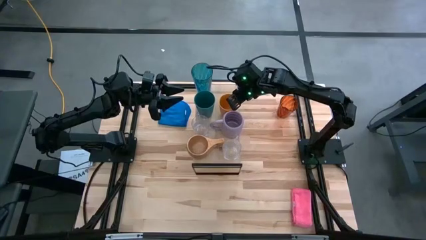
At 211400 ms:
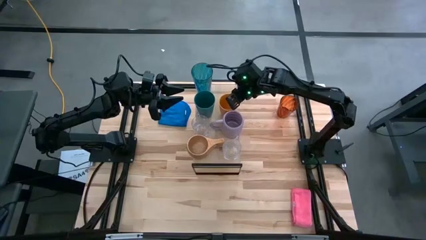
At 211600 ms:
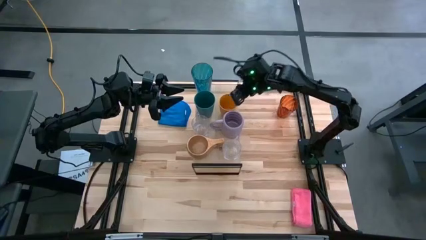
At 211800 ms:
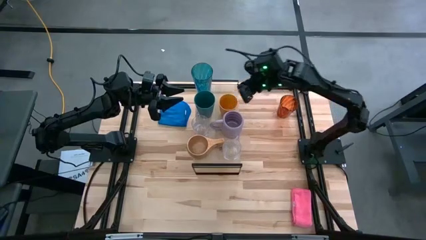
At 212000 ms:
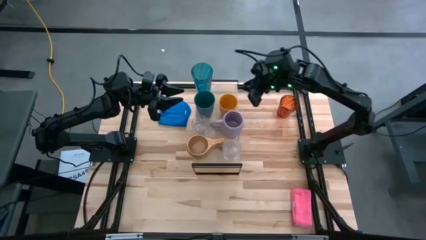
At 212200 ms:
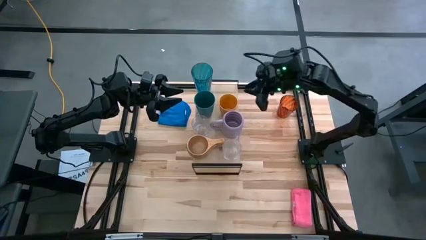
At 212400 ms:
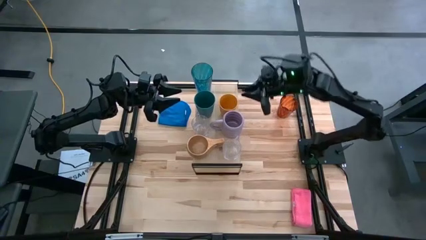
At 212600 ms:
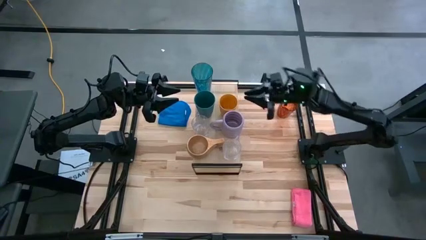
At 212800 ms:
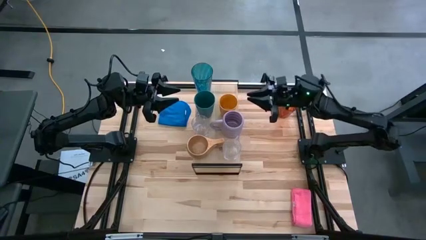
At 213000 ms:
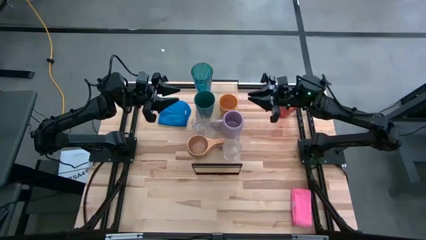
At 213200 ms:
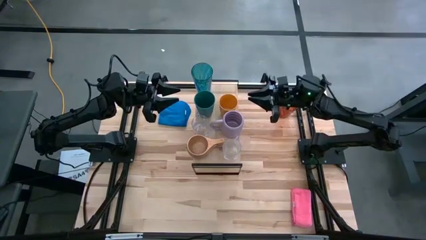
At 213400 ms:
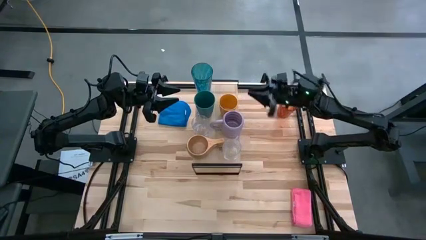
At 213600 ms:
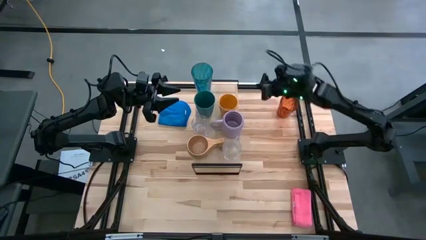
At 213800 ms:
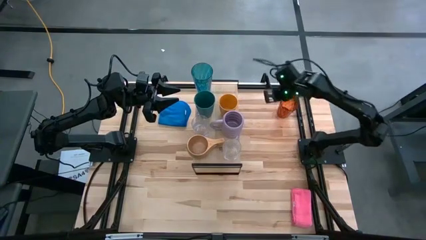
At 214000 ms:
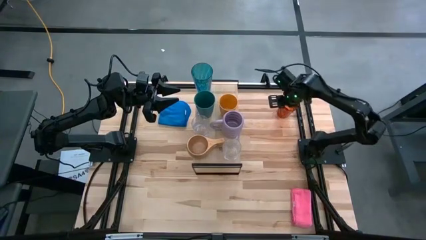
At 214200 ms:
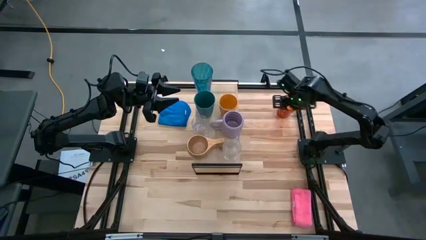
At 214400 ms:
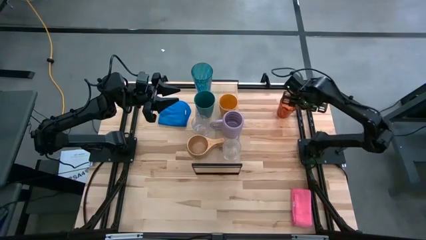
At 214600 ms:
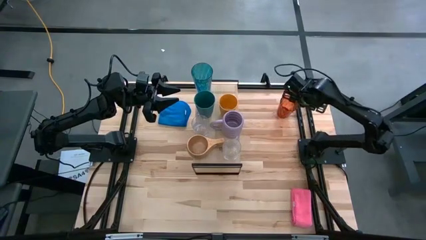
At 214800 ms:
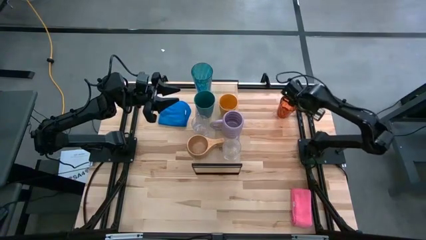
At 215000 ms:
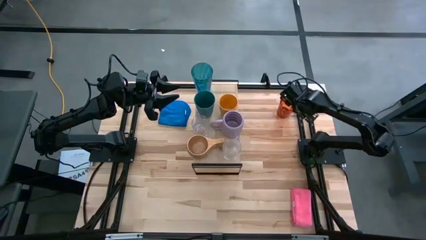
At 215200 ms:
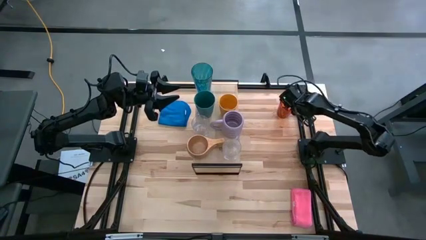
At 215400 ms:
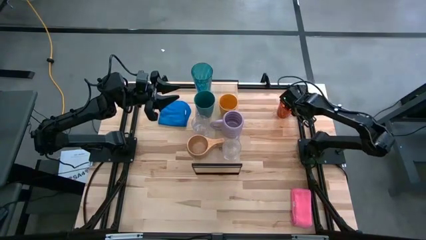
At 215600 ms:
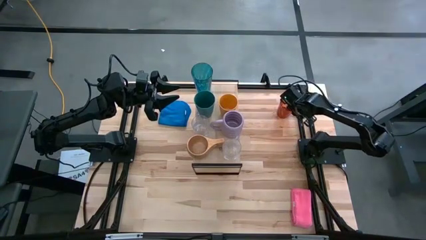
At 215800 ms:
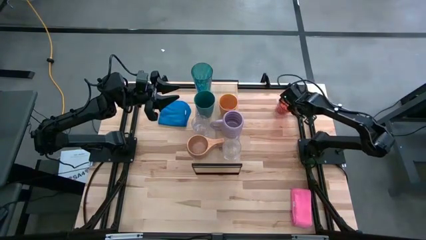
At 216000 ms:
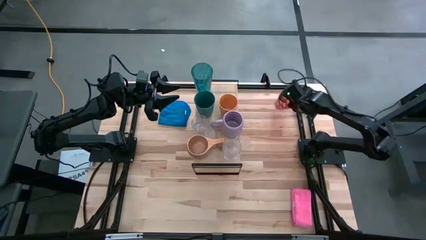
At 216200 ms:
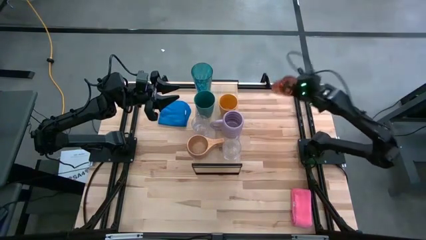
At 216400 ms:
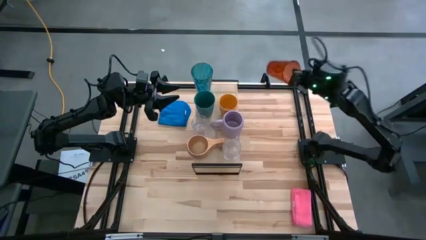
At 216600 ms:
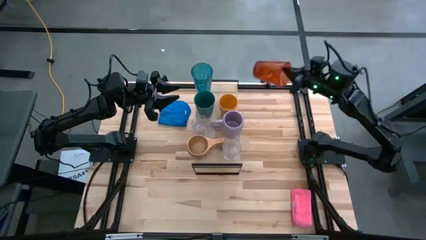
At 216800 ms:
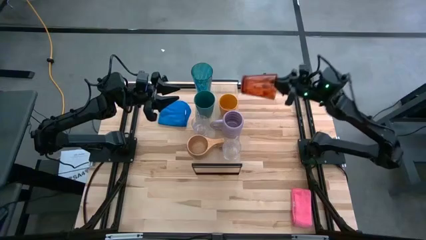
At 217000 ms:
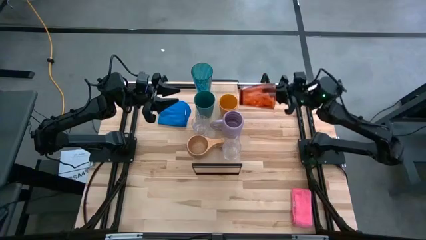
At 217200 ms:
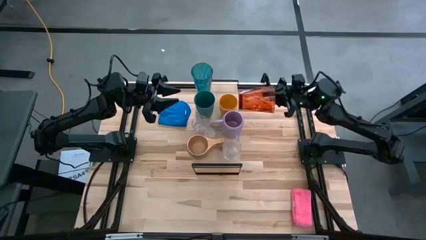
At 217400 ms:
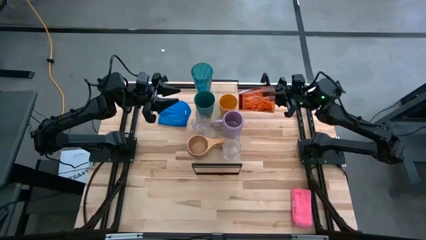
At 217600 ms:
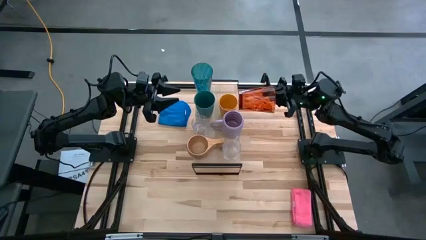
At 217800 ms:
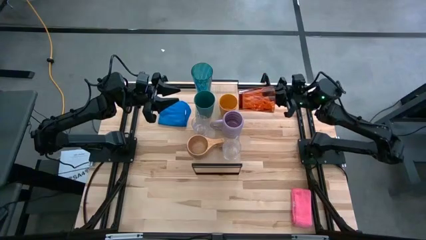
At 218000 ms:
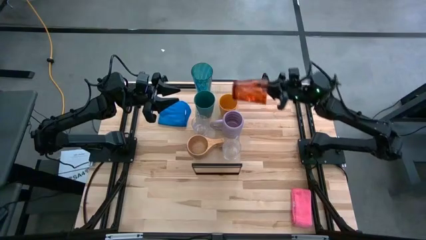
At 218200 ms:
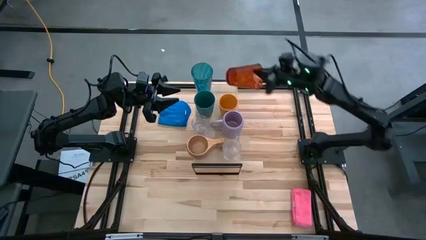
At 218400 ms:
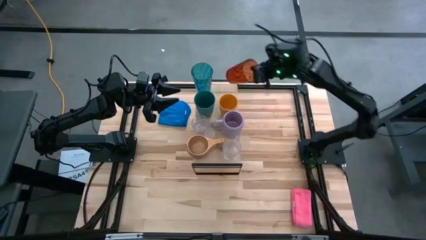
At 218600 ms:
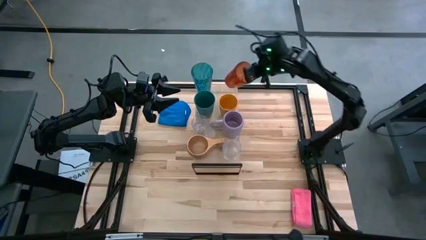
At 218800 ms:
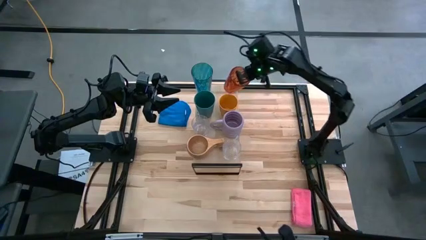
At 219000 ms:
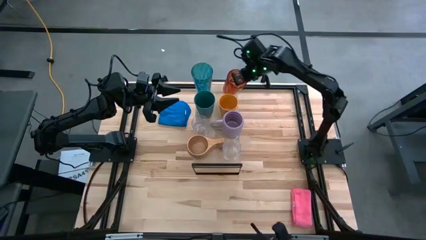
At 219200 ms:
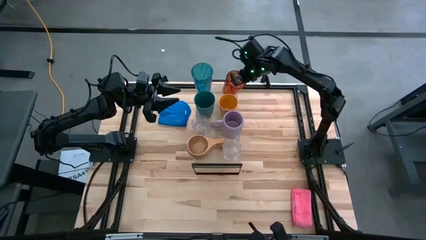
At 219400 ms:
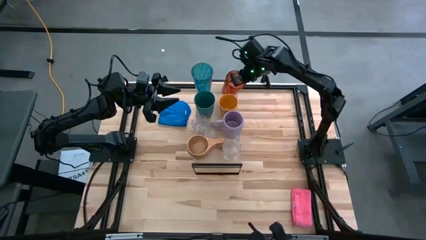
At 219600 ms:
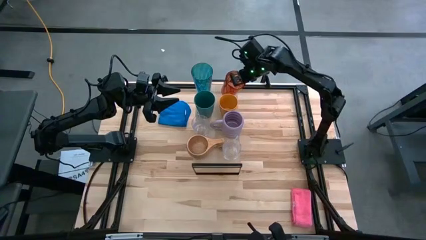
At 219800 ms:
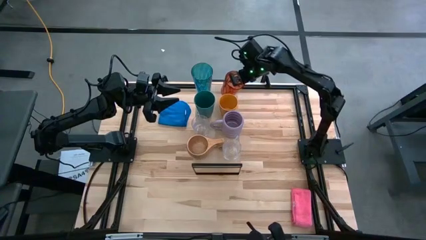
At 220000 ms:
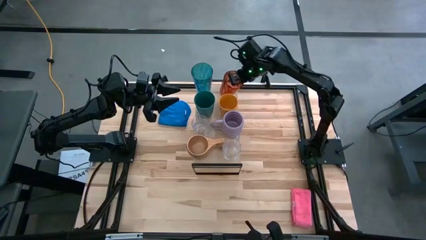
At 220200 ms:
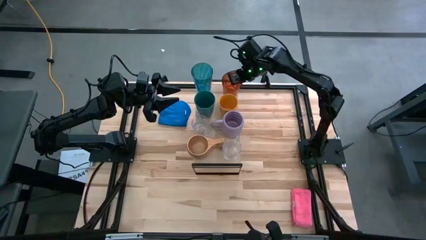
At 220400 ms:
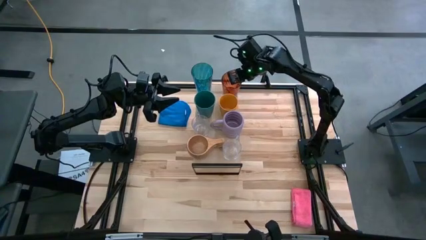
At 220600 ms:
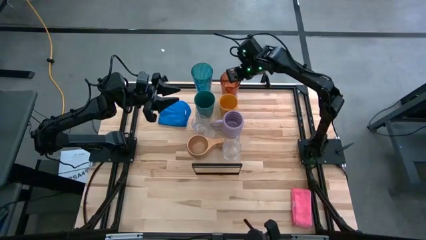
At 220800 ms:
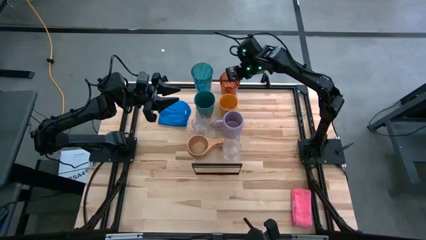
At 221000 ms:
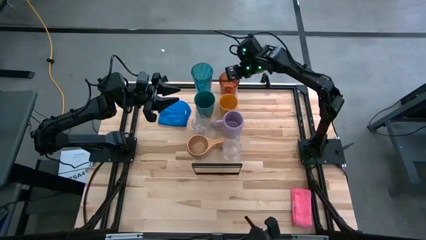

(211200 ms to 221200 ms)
Task: Stack small to large cups/mugs on shelf
Put the orange cup on the shelf

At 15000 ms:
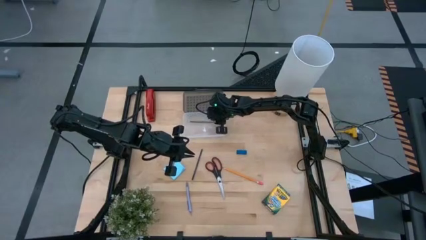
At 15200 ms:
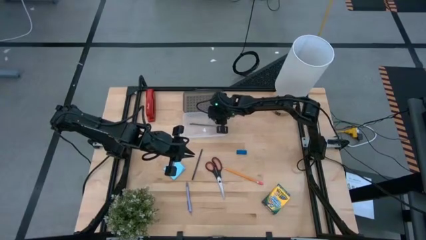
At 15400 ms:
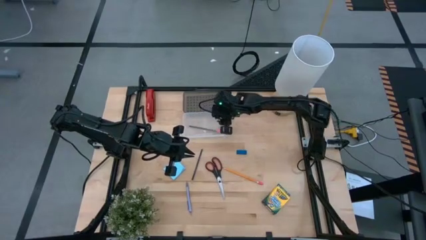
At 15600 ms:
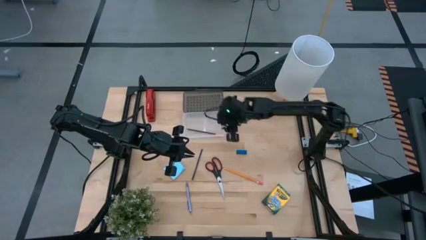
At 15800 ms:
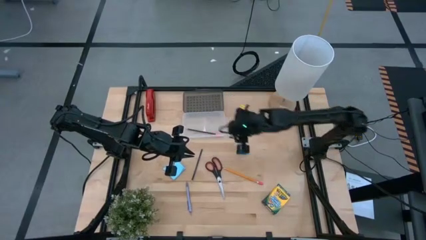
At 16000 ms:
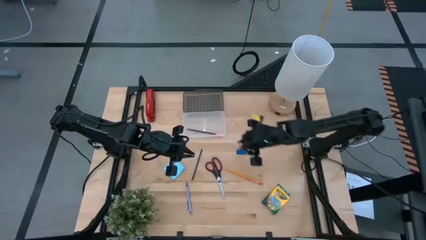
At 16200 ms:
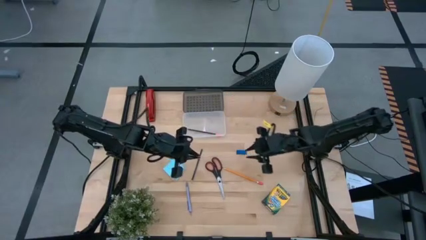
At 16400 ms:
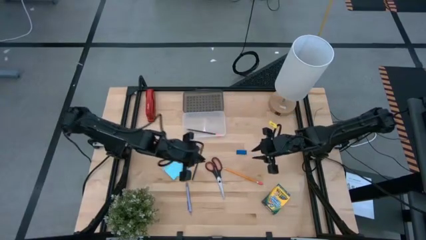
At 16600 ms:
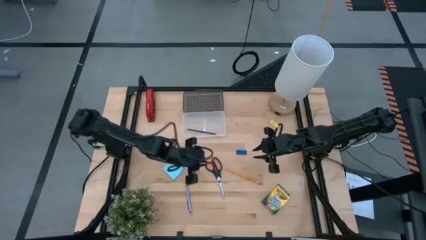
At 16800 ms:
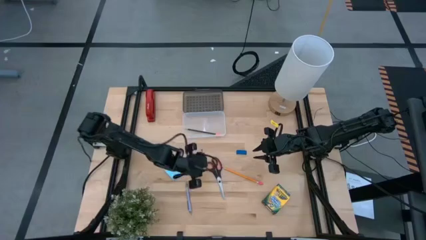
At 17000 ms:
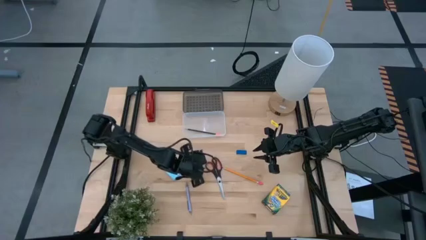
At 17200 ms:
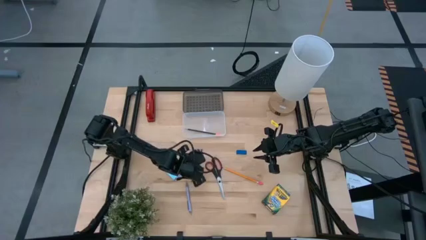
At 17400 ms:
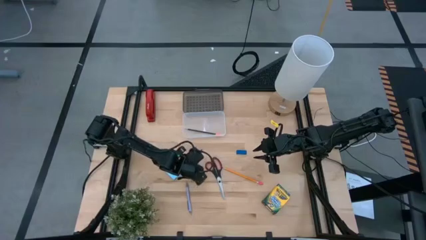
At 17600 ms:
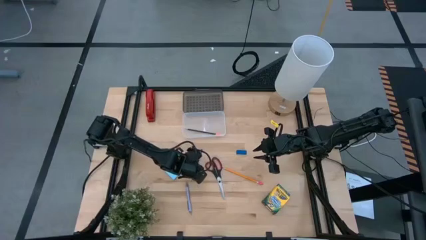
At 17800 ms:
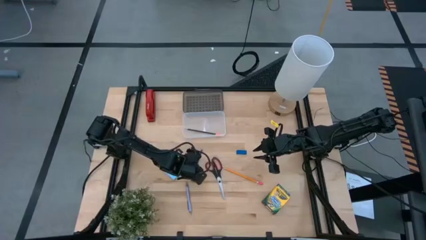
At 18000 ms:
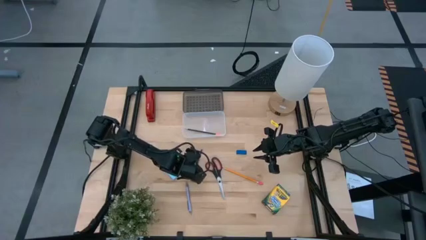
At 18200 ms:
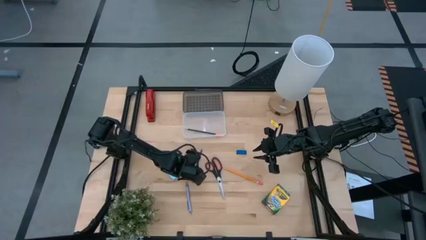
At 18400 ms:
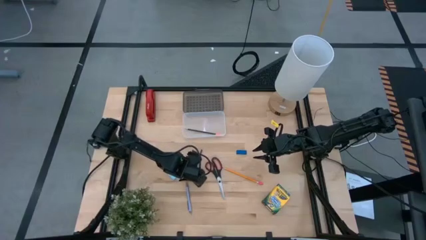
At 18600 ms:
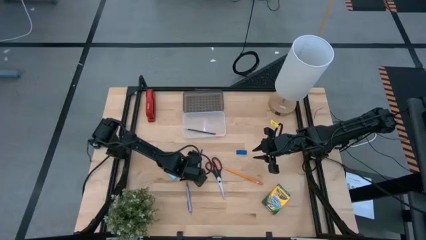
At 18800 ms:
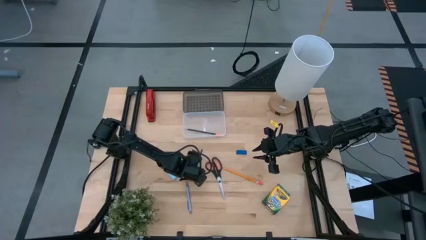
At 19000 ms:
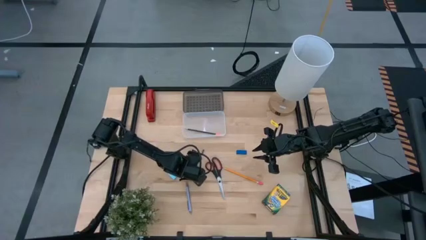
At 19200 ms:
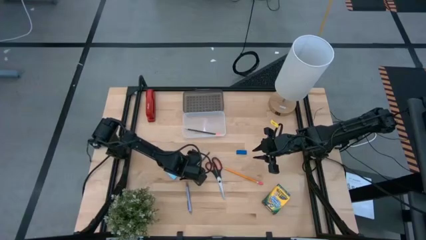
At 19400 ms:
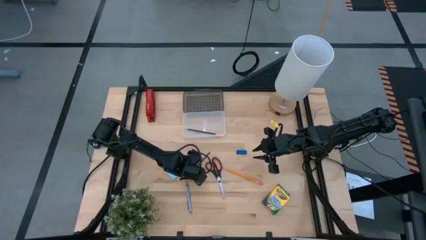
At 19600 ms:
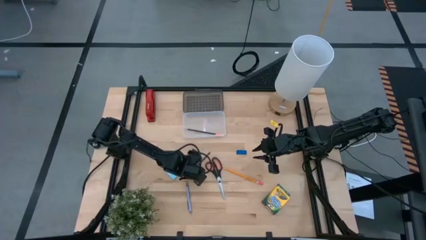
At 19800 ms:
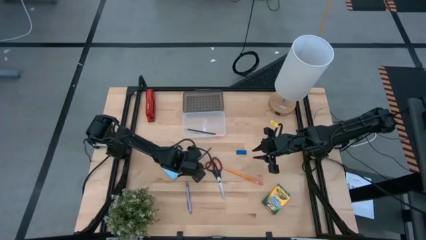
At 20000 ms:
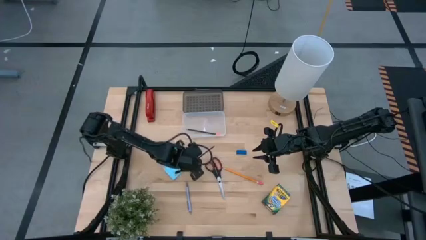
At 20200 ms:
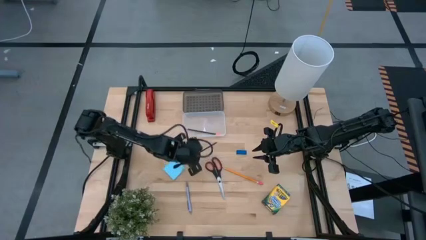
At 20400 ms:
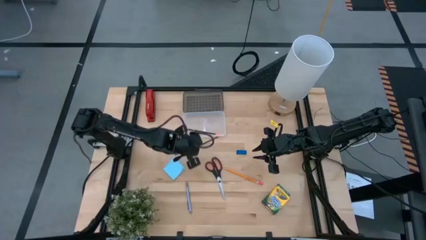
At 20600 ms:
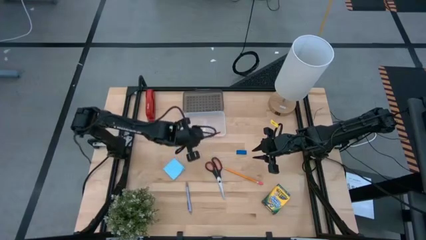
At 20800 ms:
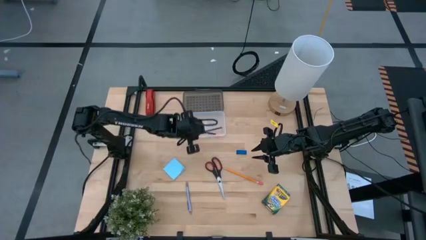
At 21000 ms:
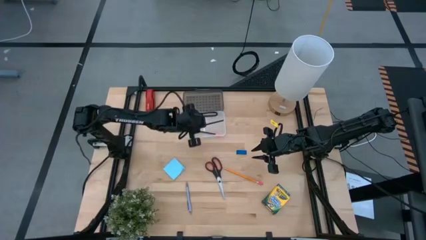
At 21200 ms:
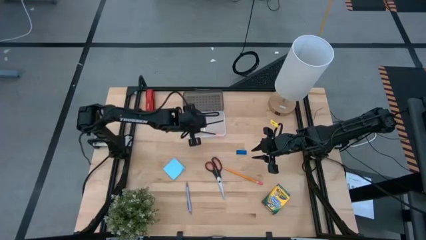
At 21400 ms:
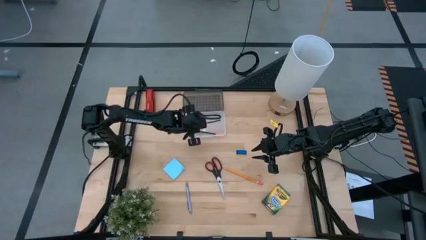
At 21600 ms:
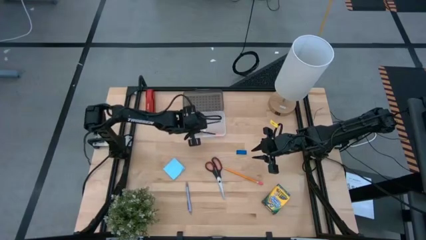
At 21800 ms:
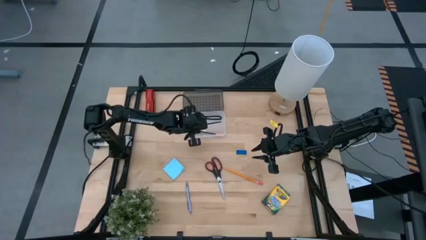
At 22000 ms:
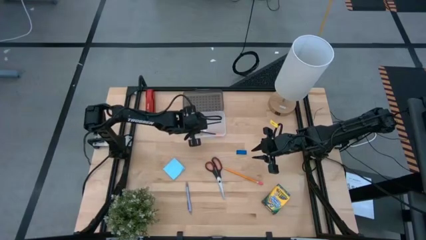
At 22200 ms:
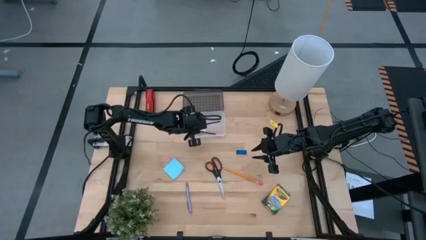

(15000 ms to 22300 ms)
Task: Pack school essentials
Put the blue pencil into the black supply box
